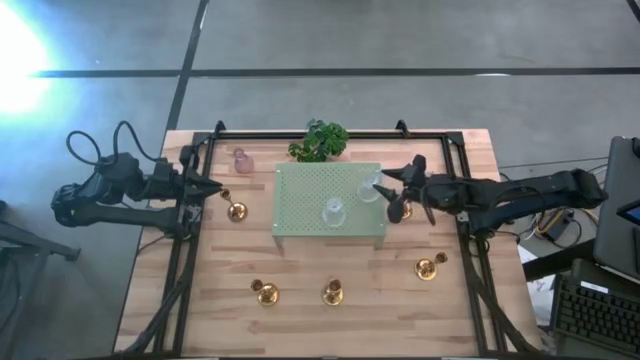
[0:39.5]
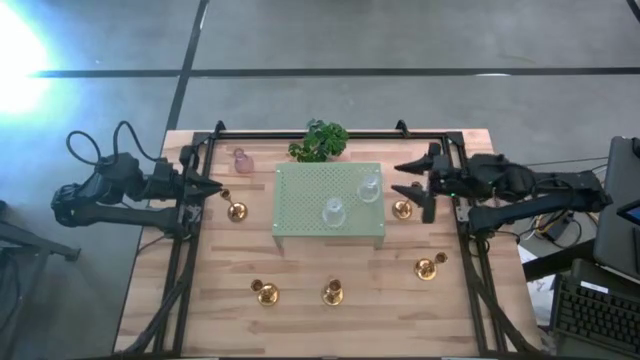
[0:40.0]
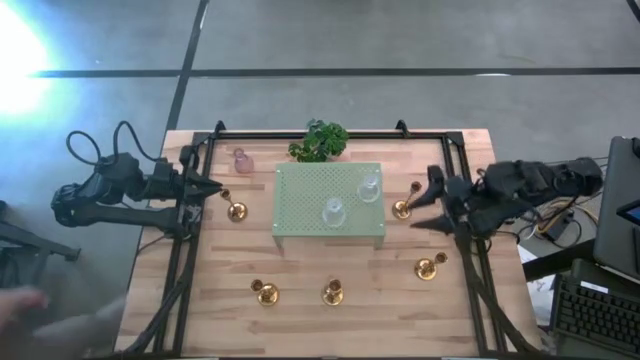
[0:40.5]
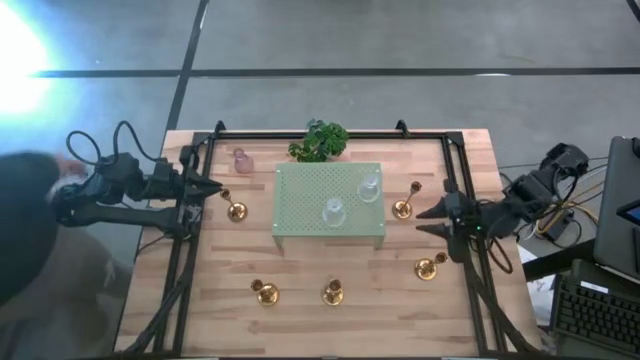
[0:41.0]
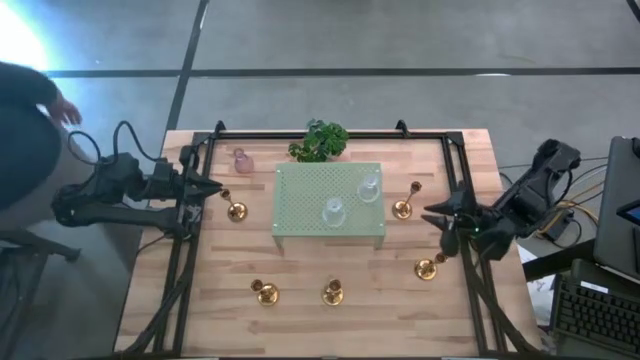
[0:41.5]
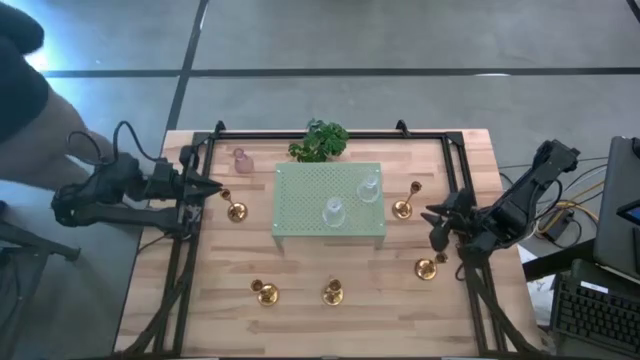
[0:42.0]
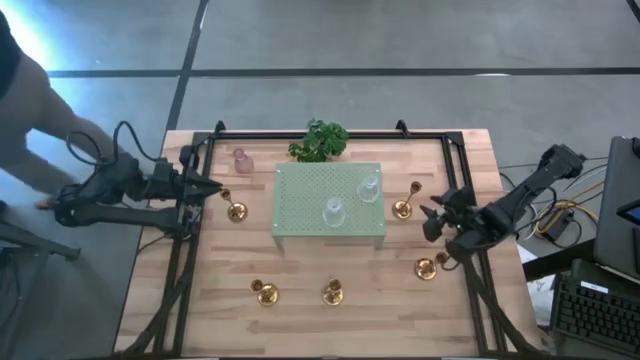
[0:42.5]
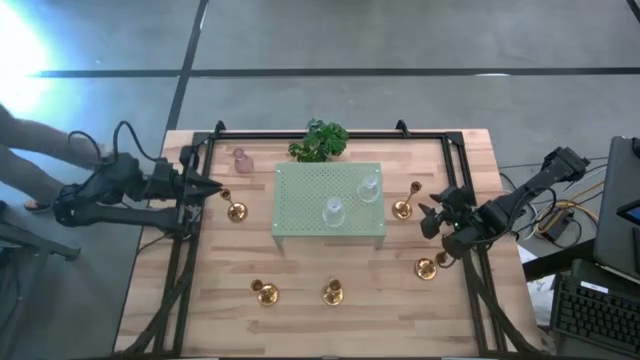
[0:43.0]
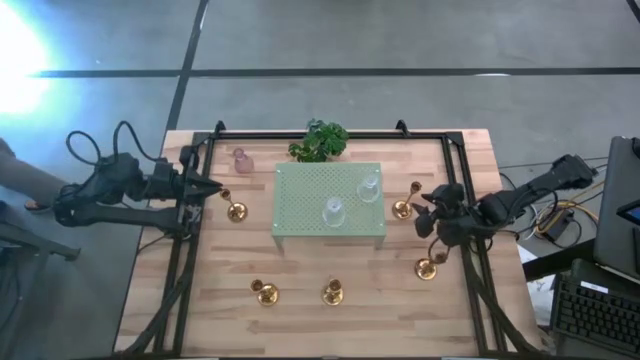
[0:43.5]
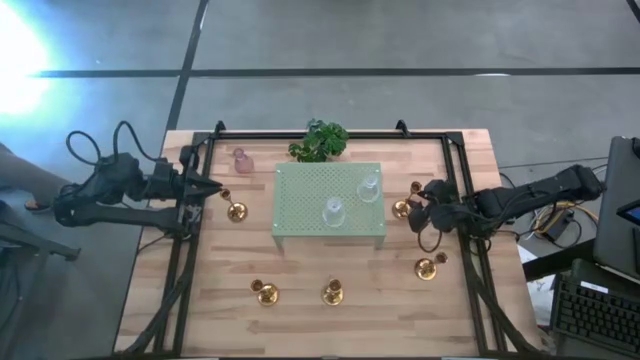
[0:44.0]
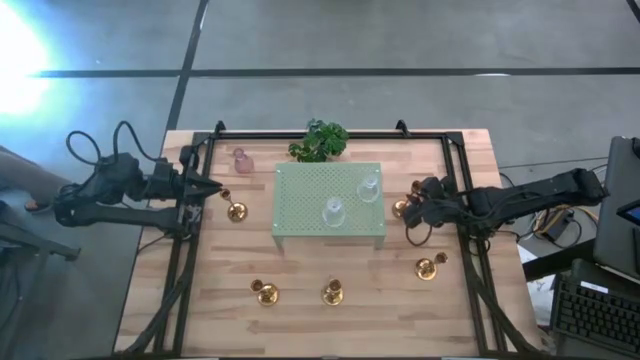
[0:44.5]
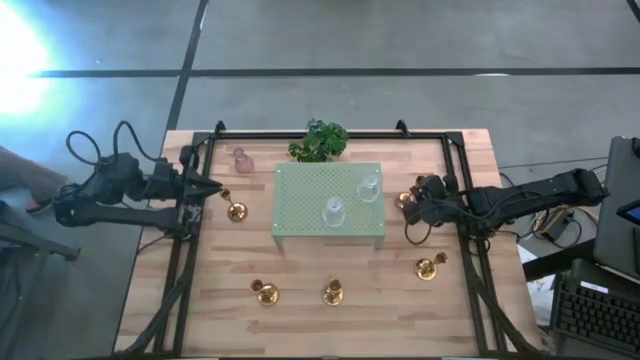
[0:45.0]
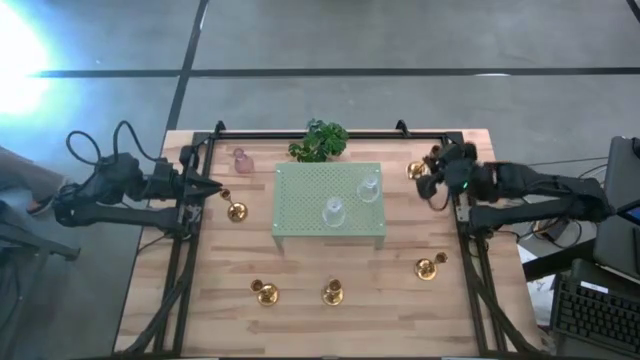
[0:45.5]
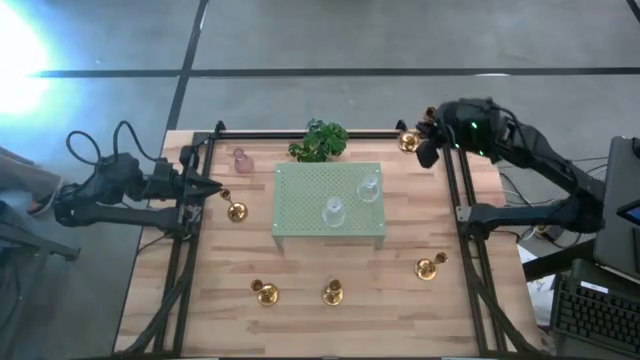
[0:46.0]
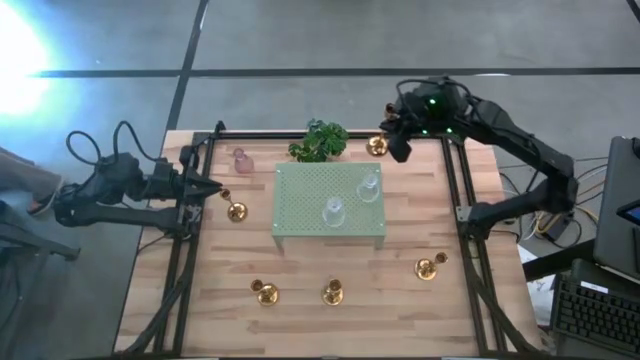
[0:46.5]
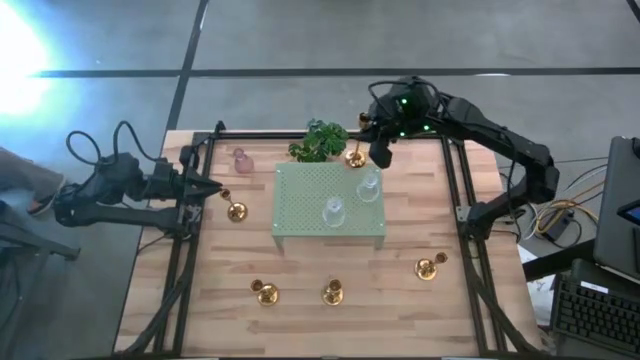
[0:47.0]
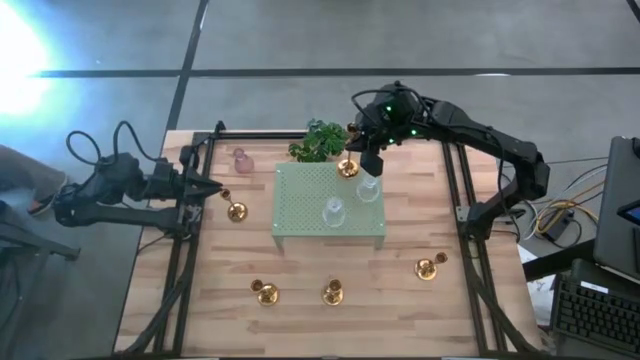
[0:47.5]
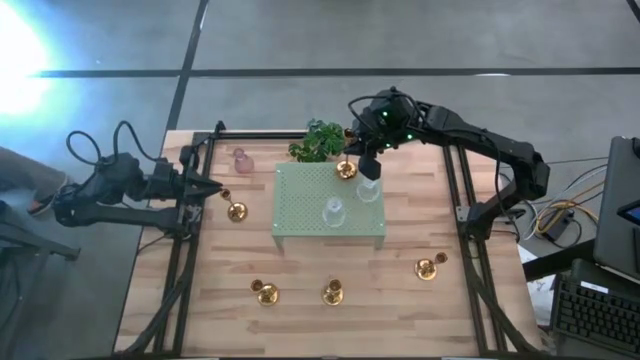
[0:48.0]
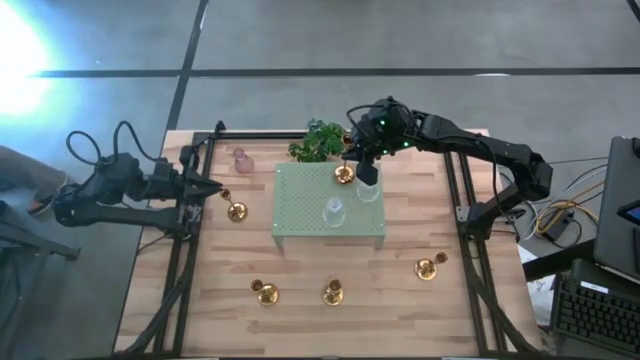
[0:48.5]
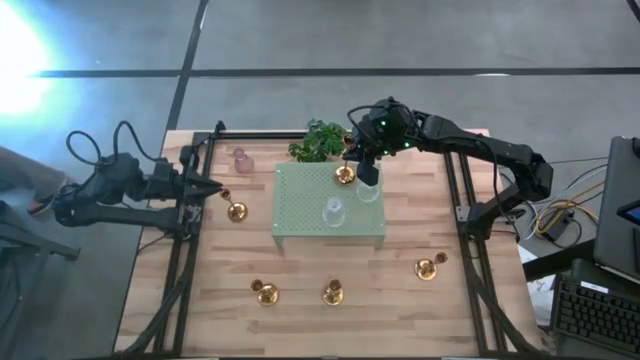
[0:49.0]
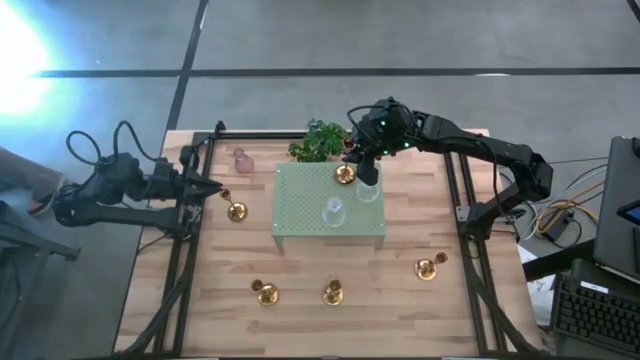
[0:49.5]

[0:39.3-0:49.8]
Task: Pick & Place candle stick holders
Put the gold candle holder on the shelf

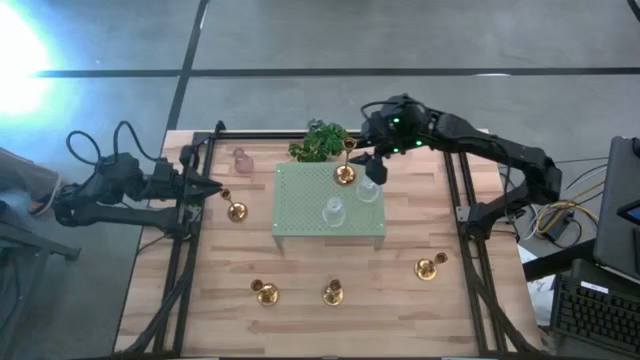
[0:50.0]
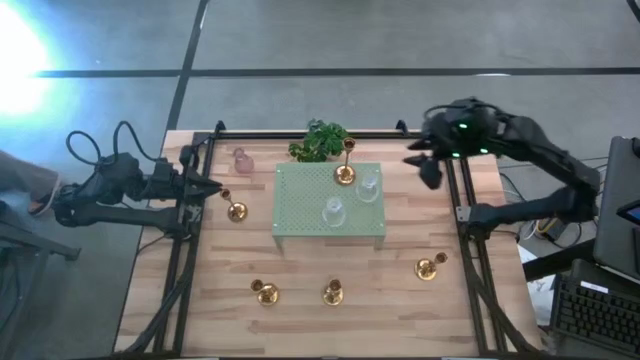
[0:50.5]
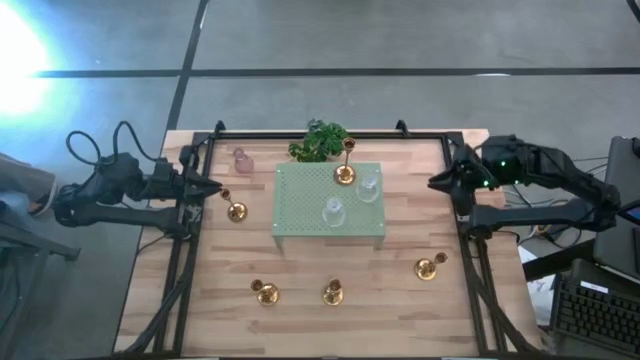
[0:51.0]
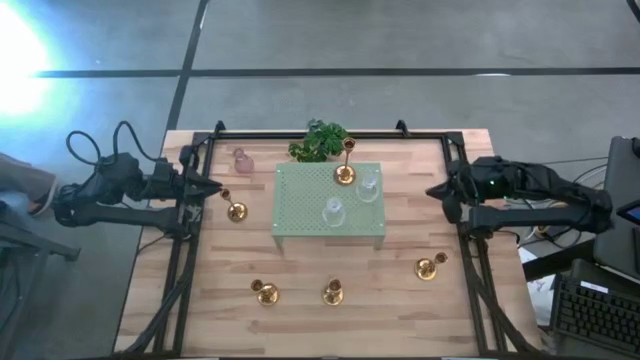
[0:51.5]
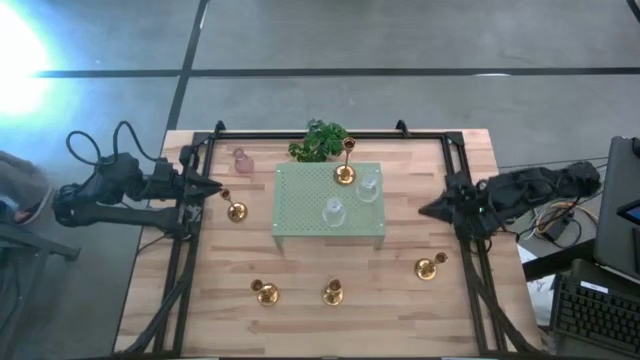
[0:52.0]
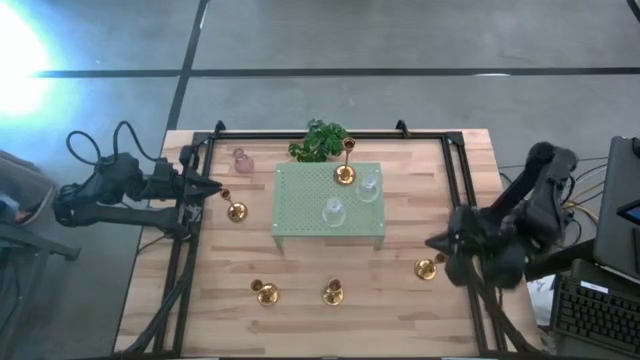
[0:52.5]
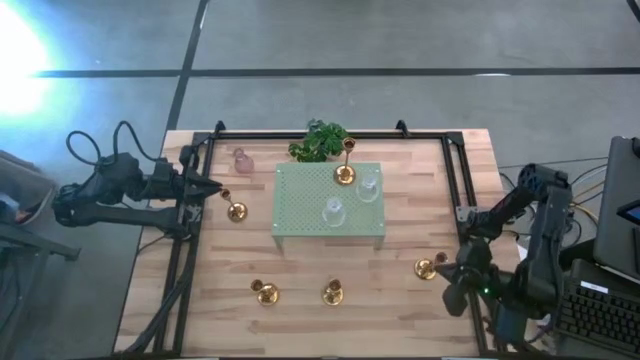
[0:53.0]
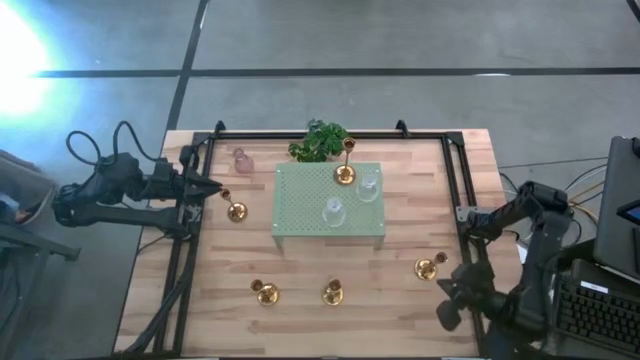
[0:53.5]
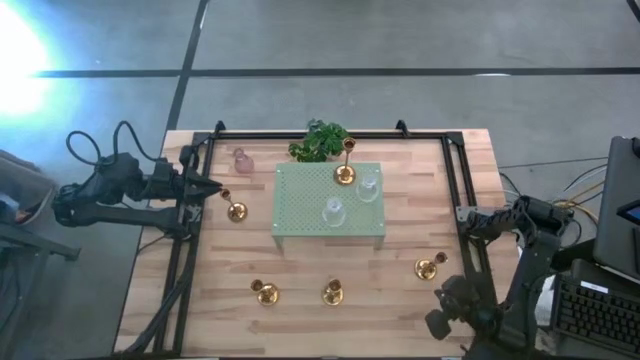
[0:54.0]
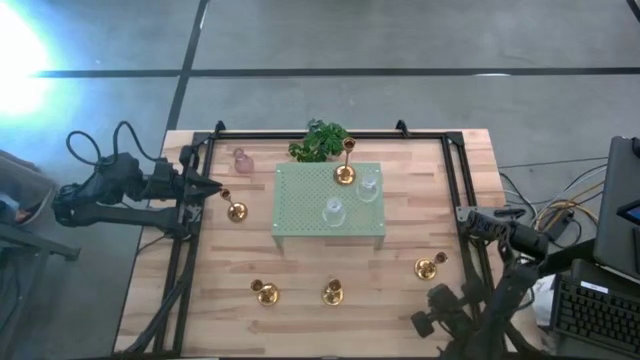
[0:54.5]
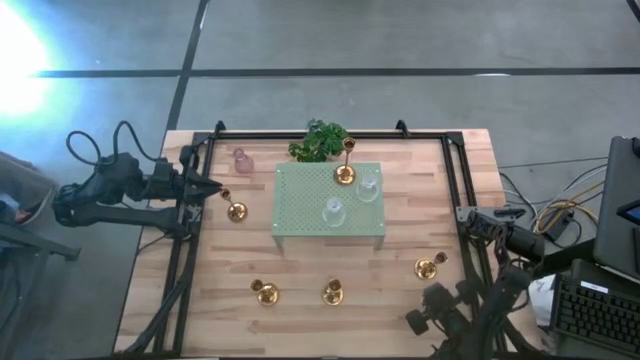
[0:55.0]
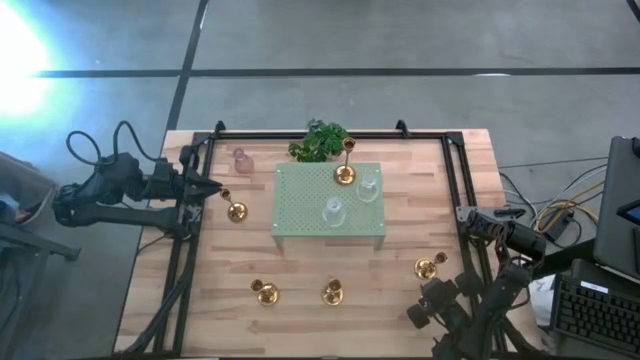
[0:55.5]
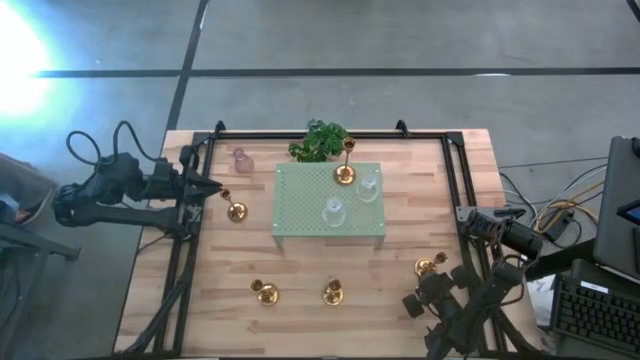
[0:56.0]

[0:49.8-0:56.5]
Put the gold candle holder on the shelf

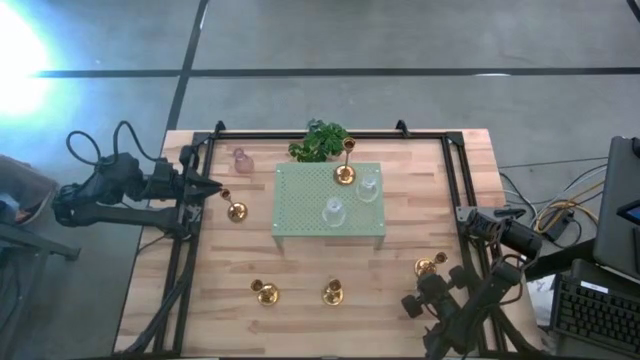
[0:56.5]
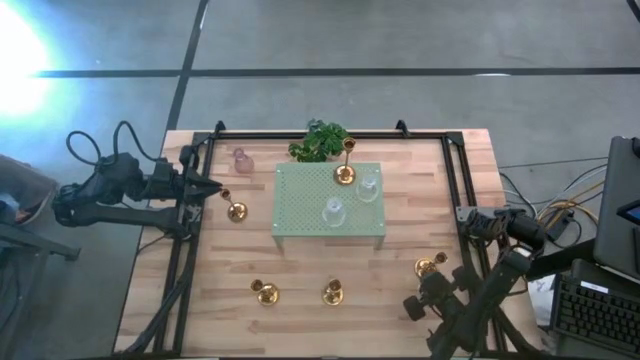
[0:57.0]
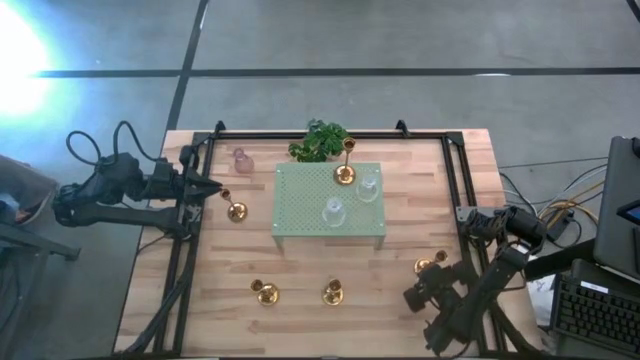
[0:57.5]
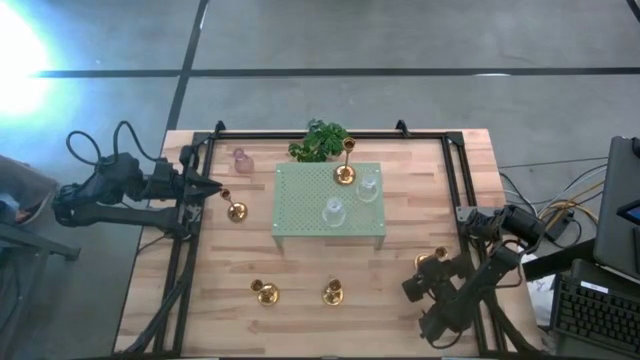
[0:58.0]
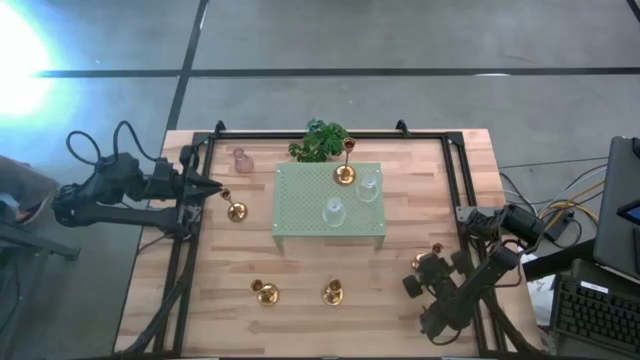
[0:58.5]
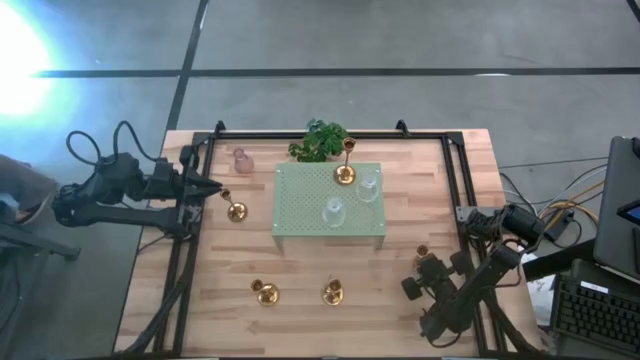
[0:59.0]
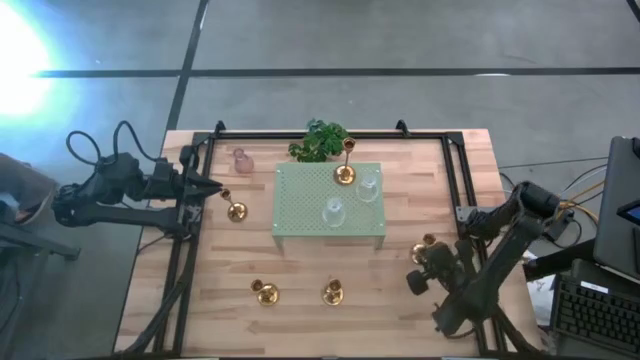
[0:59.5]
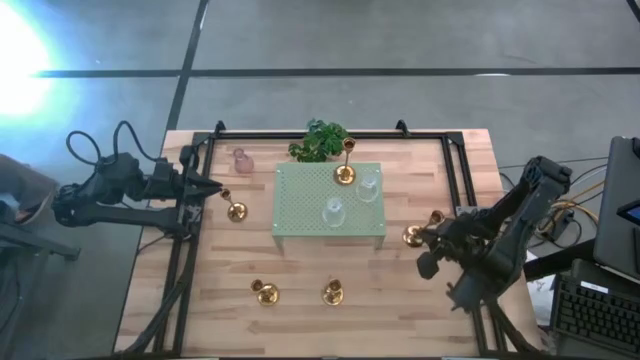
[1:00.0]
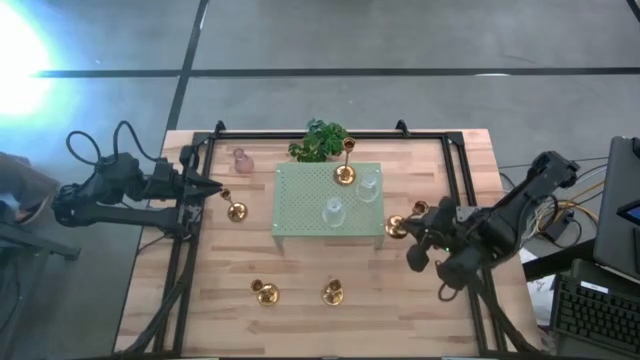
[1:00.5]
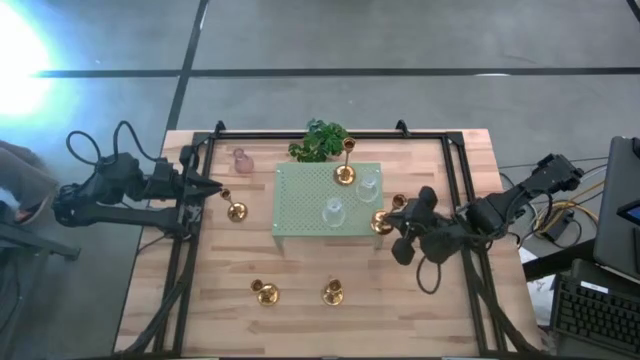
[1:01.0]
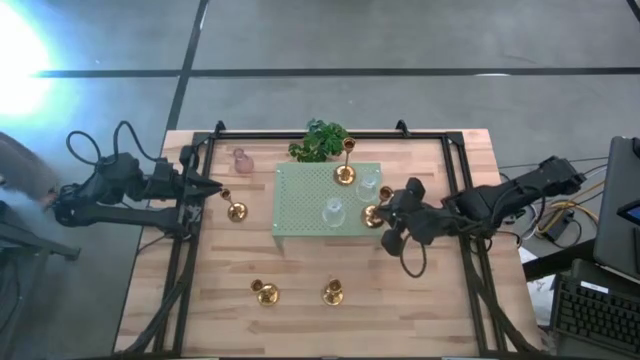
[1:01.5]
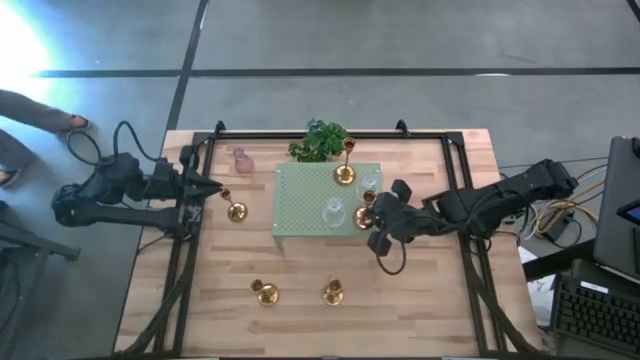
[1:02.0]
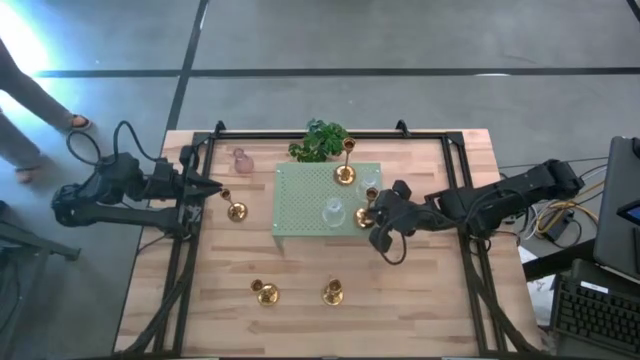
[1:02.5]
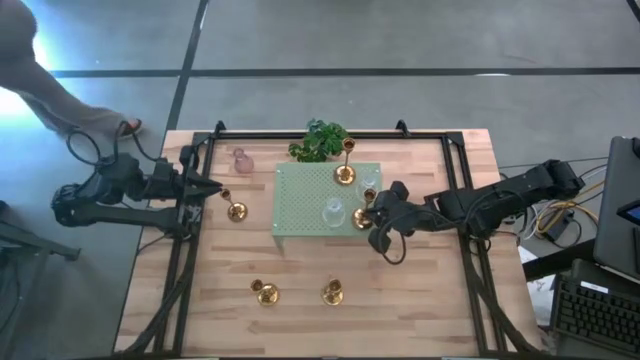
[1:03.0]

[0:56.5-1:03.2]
Put the gold candle holder on the shelf
